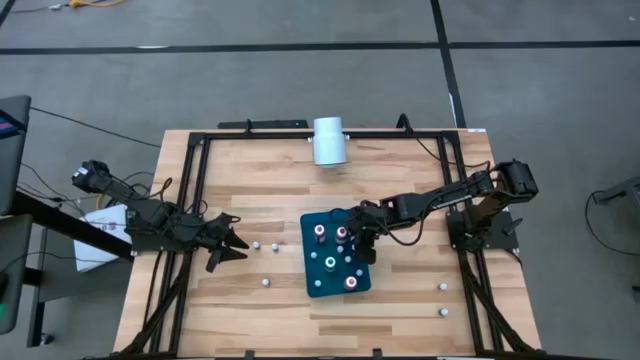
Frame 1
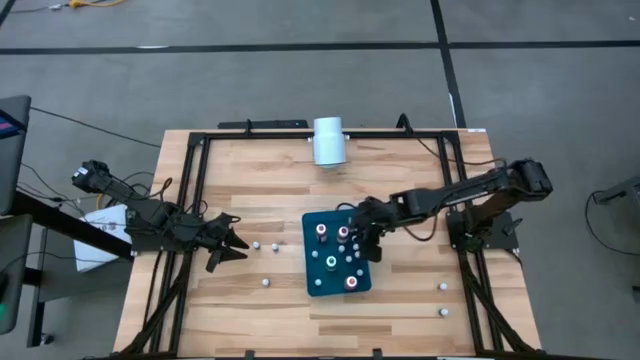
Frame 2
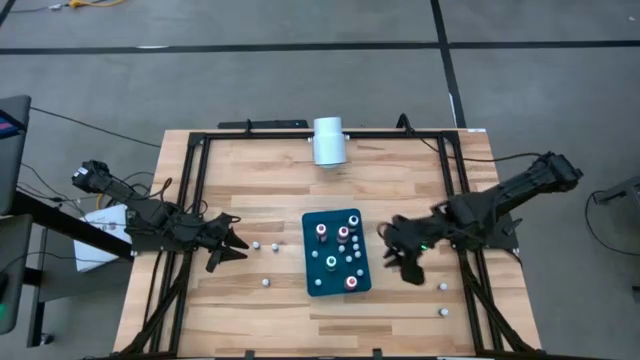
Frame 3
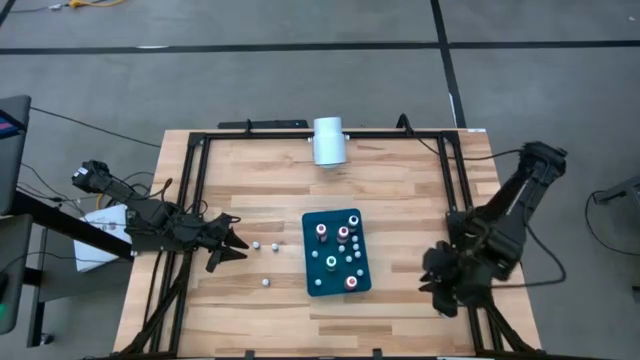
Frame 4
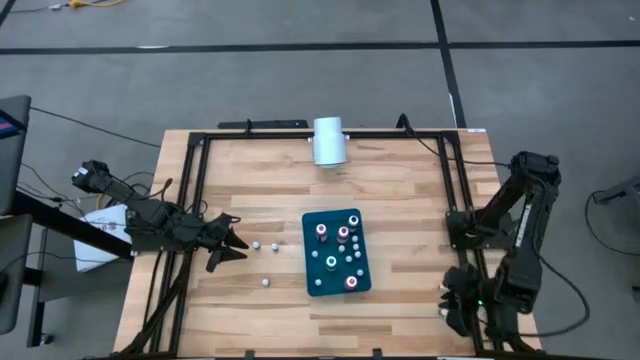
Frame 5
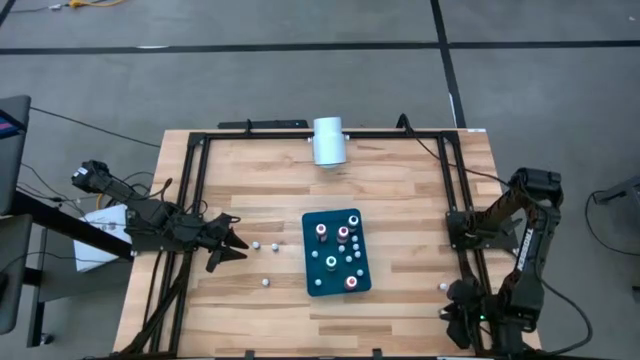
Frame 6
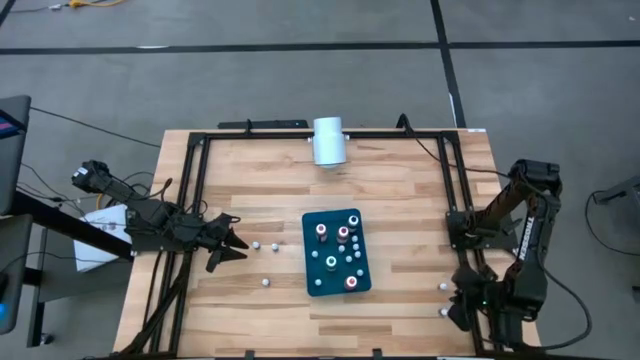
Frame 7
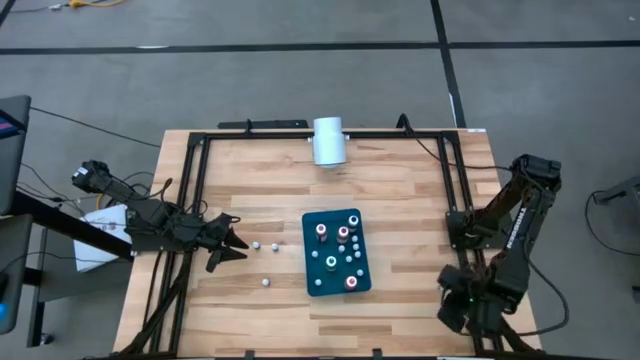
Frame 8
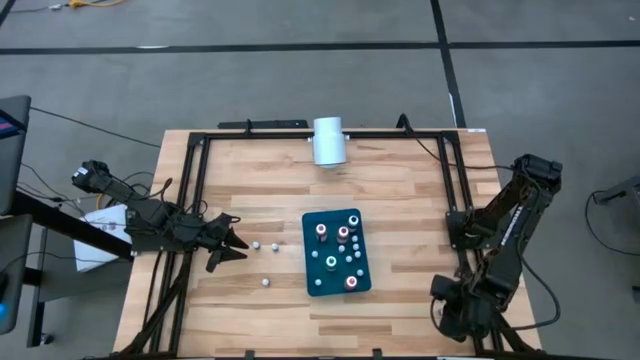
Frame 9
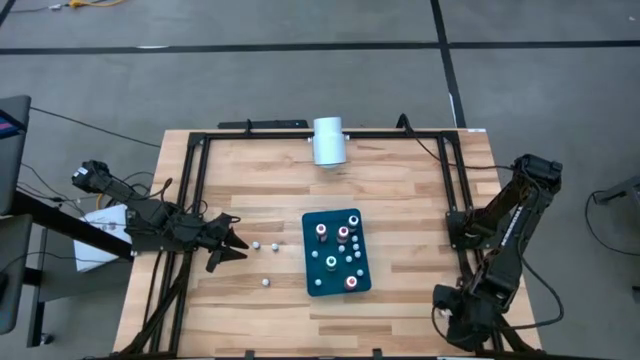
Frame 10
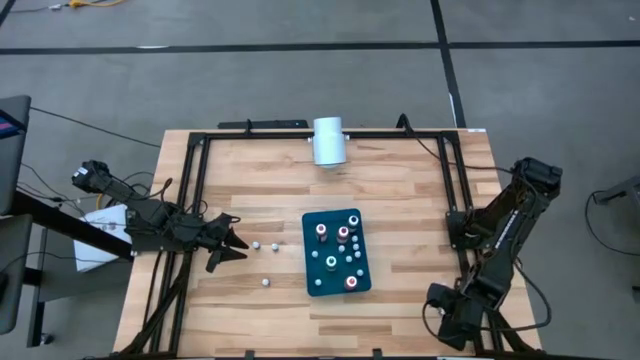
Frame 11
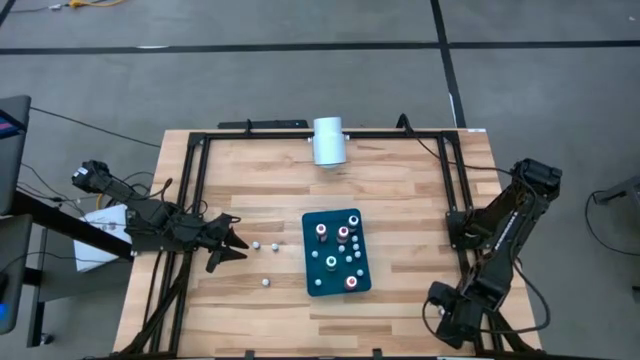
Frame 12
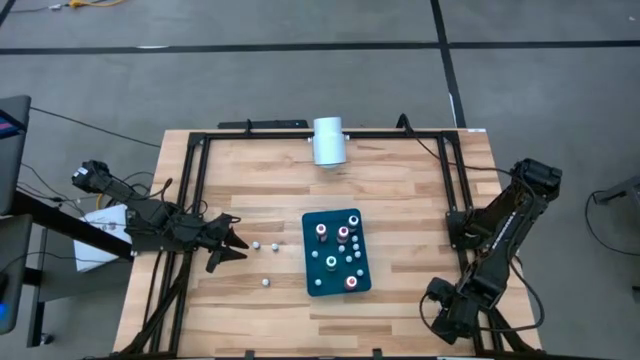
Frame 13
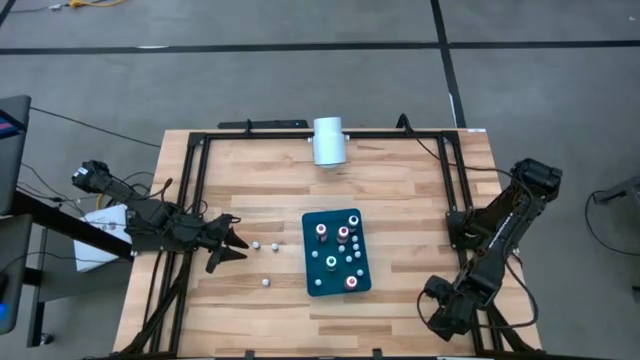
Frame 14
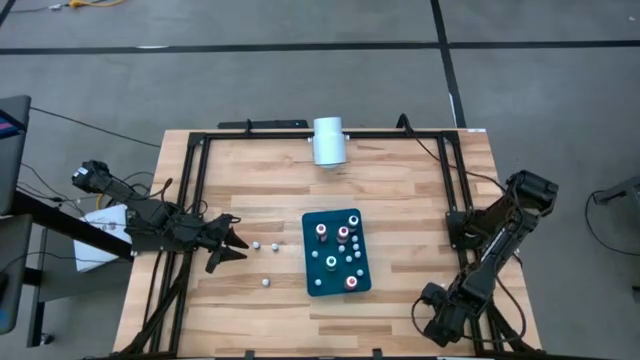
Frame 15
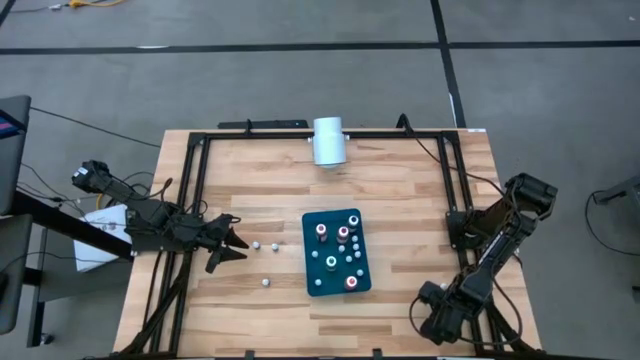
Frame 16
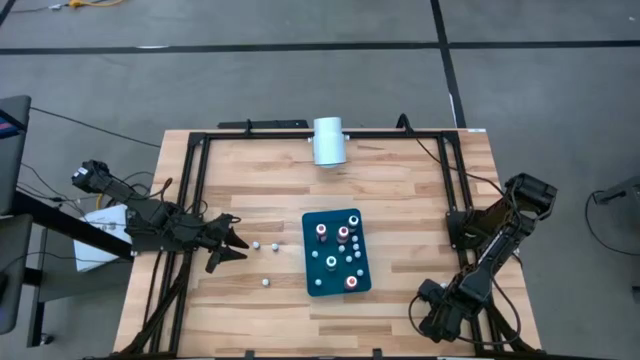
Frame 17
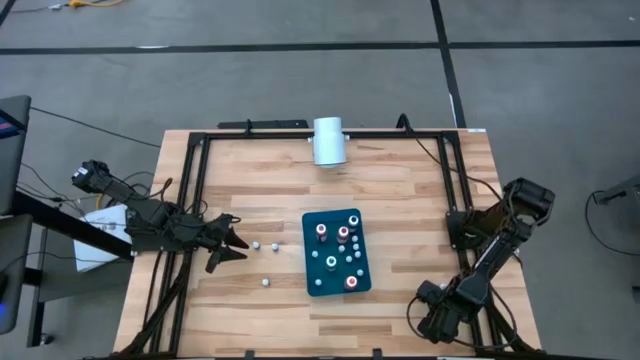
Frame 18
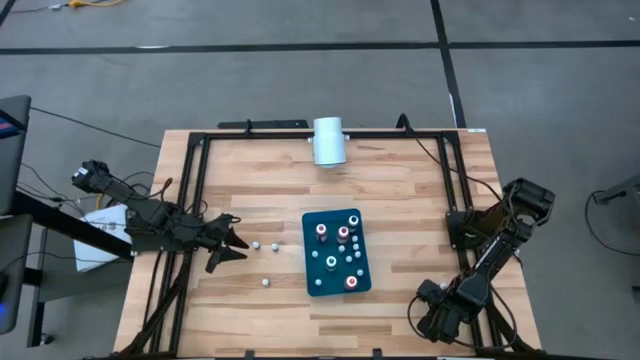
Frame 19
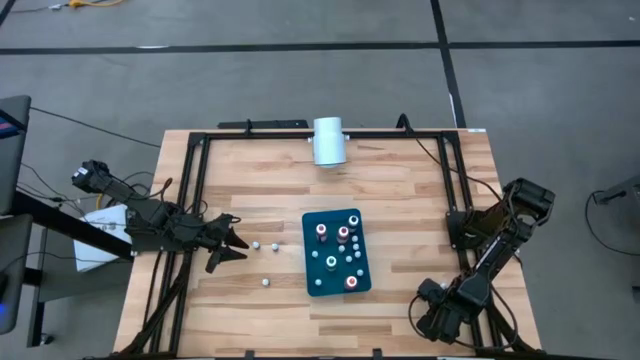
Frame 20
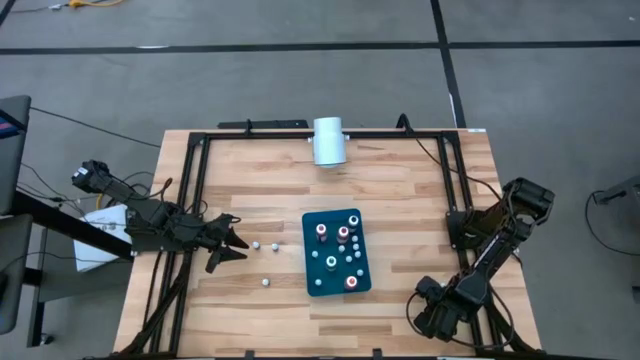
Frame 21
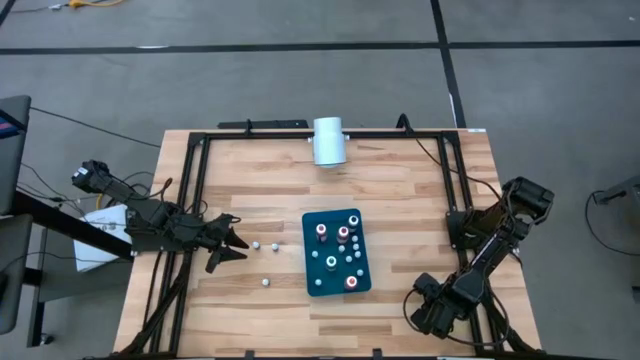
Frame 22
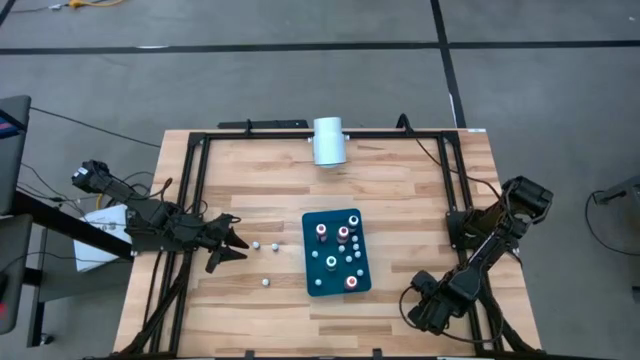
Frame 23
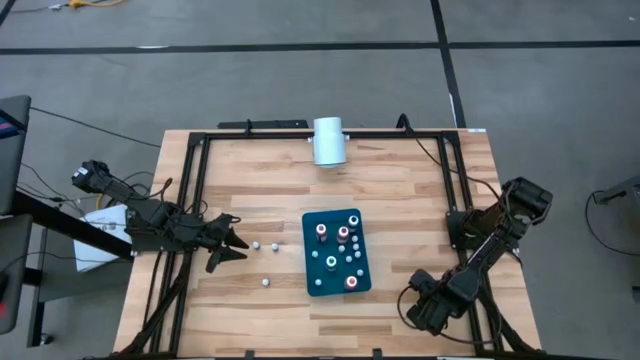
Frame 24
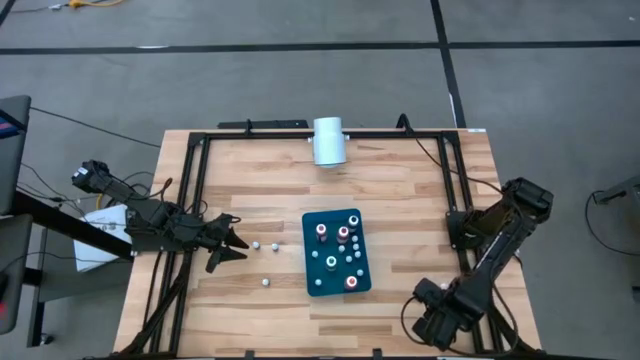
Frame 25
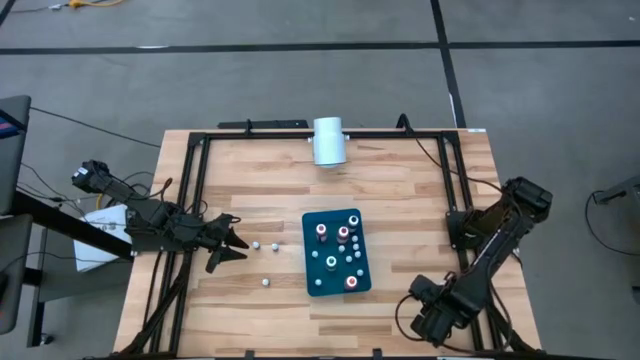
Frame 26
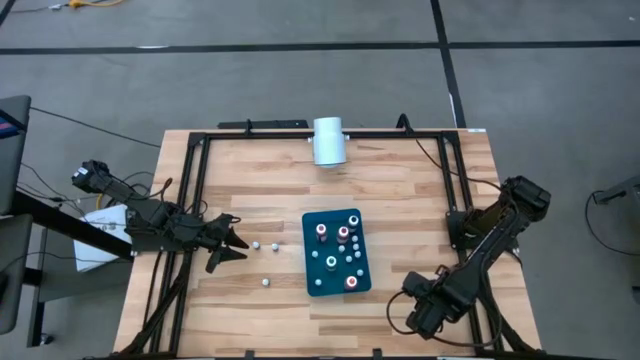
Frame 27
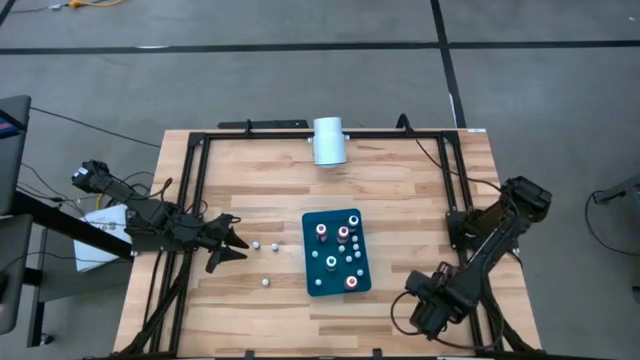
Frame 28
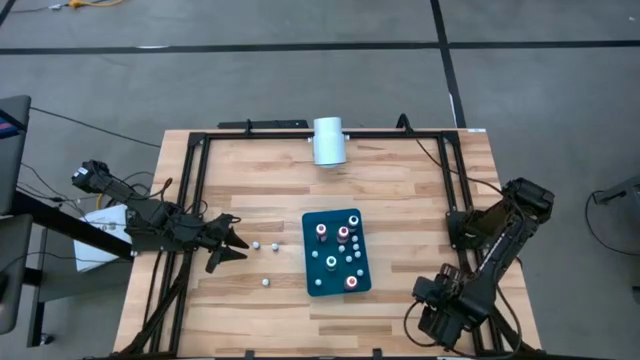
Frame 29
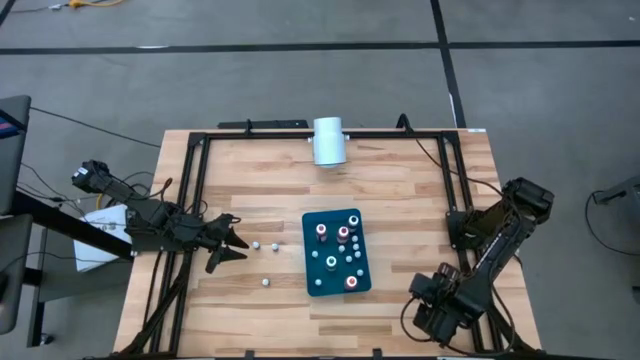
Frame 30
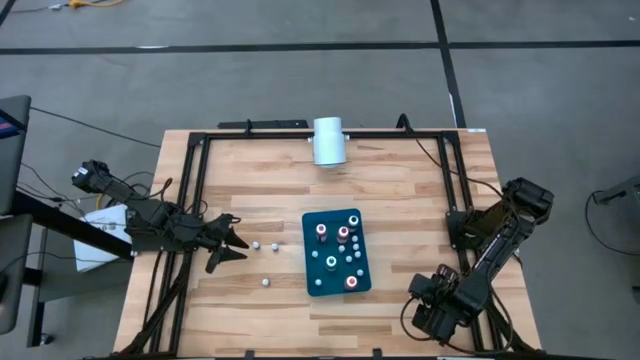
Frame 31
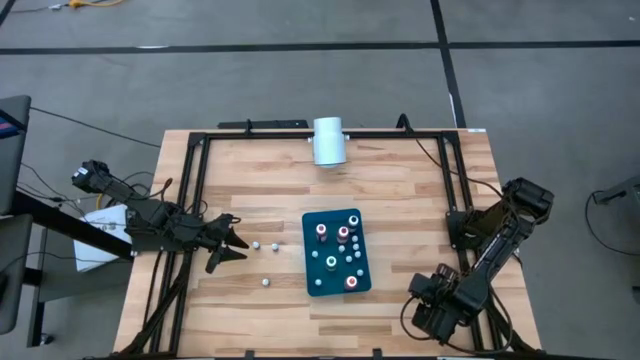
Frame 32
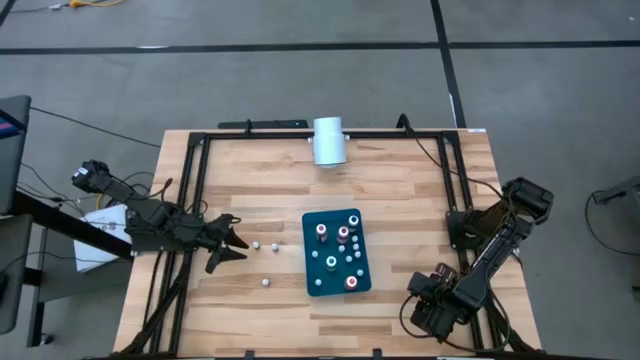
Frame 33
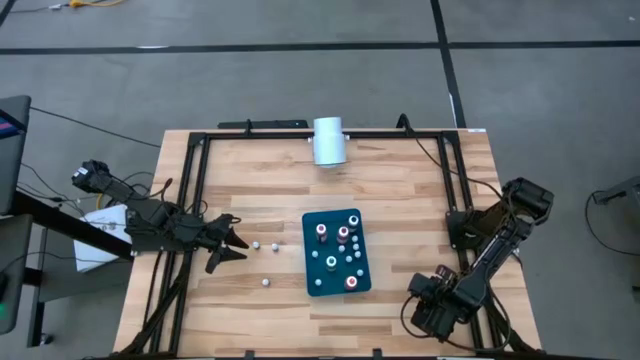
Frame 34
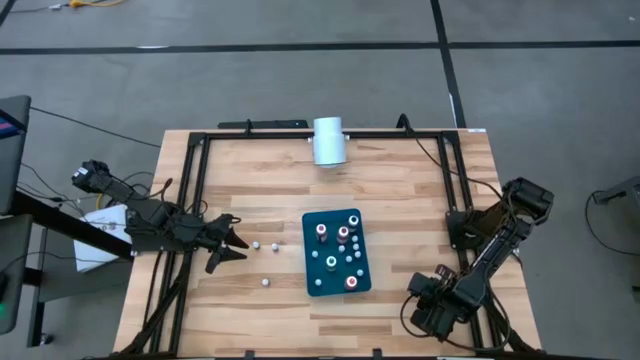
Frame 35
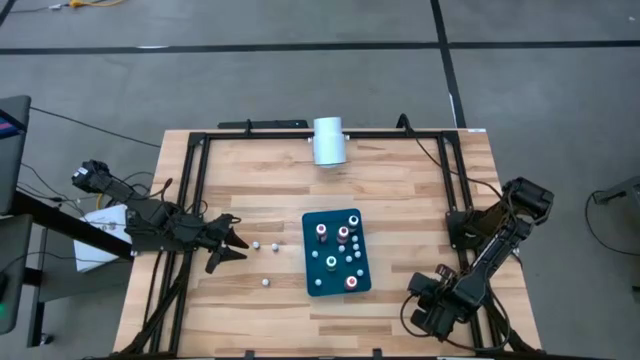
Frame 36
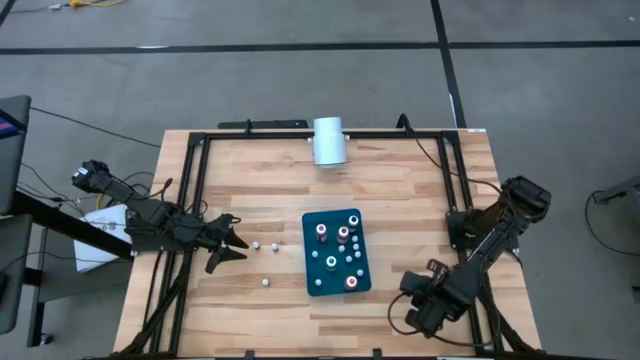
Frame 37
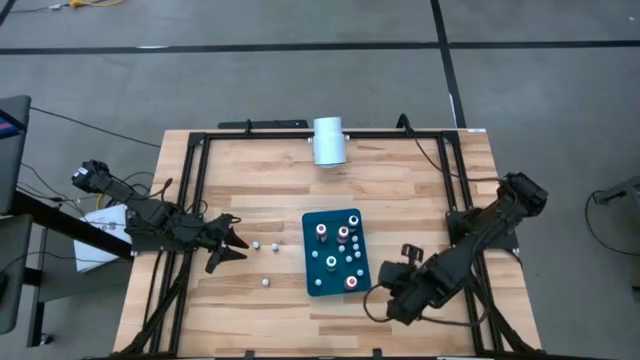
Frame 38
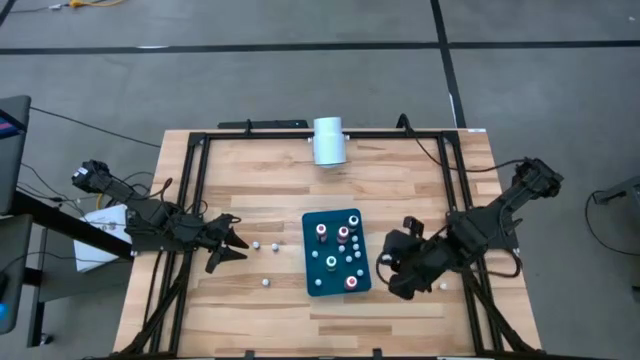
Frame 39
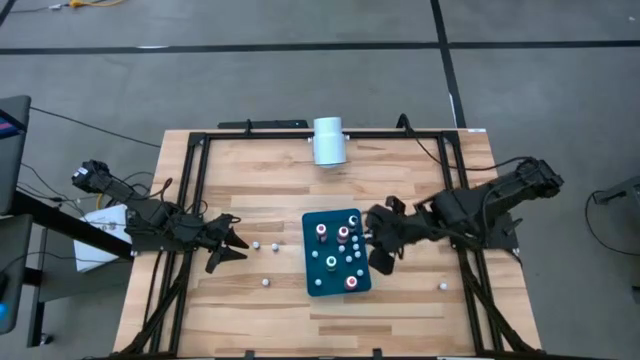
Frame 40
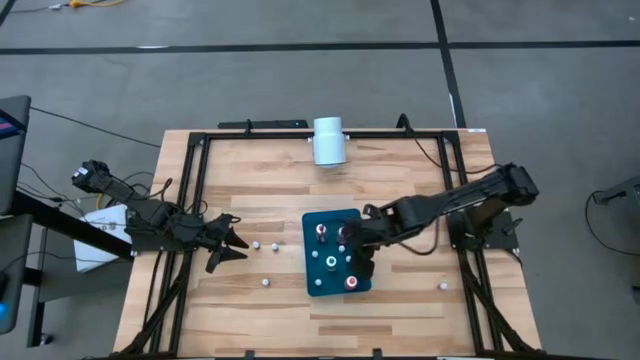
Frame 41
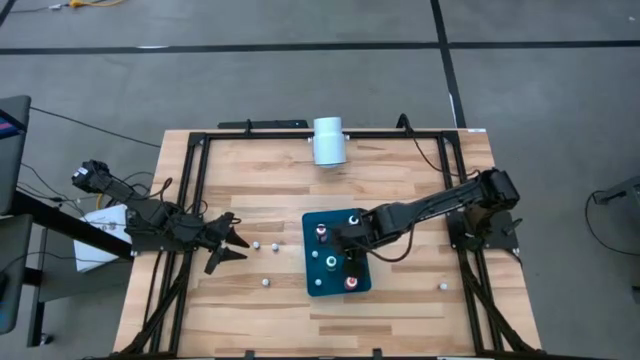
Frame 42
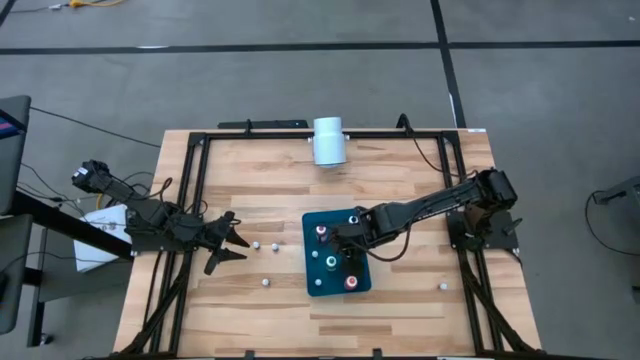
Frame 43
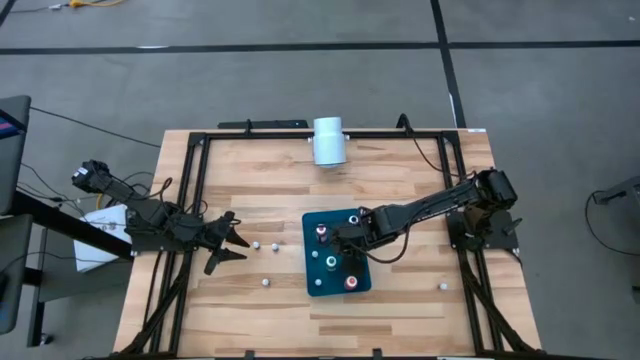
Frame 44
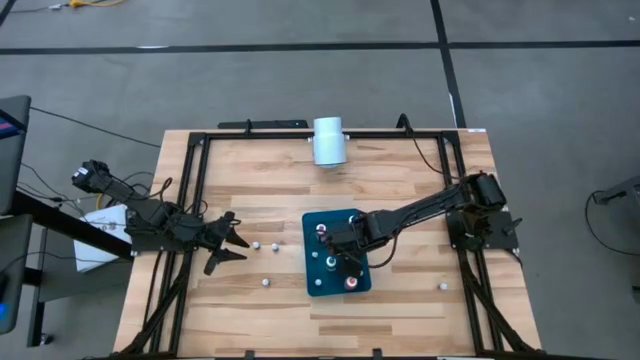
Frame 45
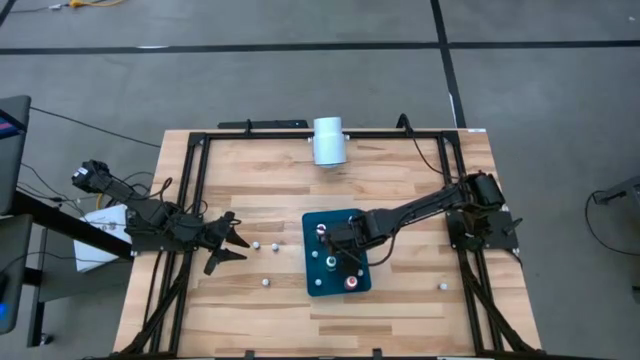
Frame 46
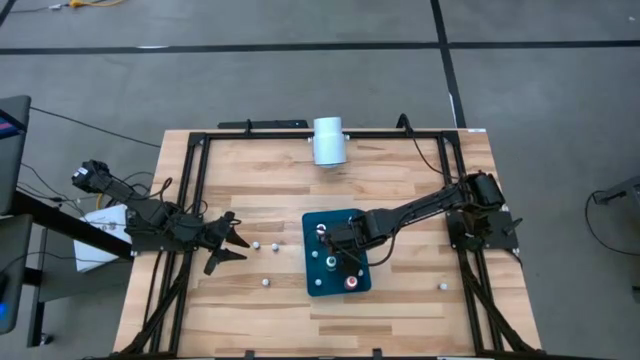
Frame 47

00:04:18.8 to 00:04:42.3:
Task: Pick & Place food coloring
Put the right small green food coloring bottle into the blue bin
